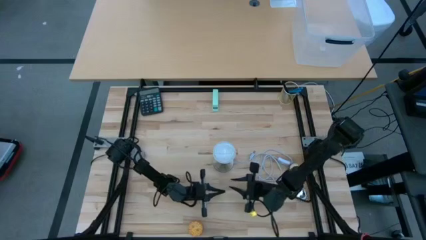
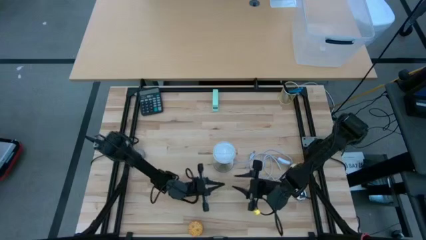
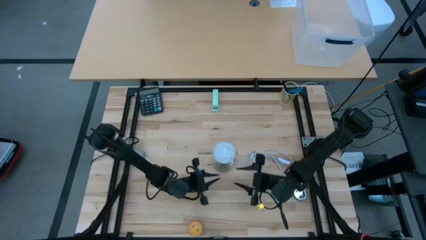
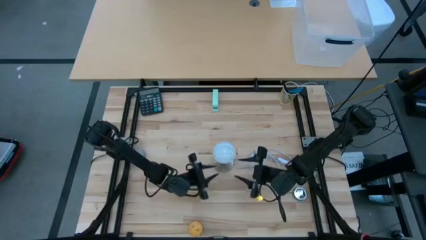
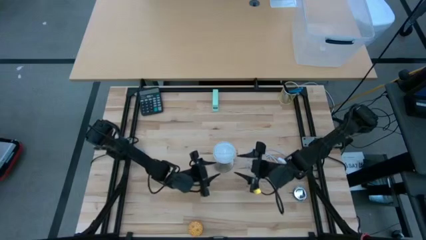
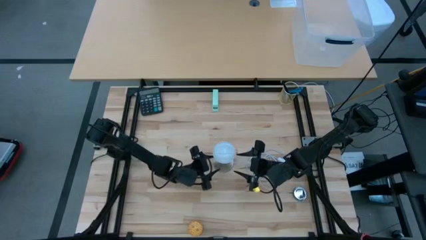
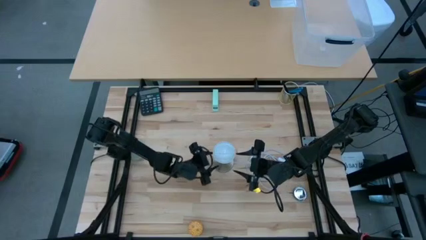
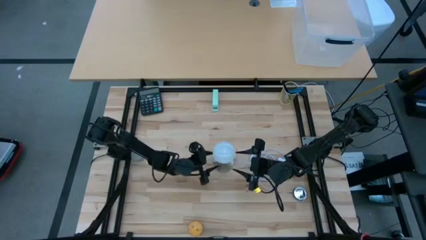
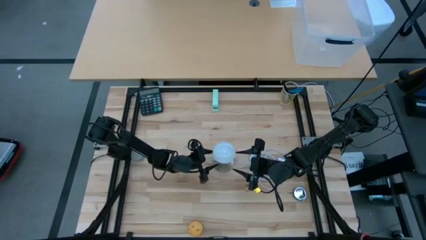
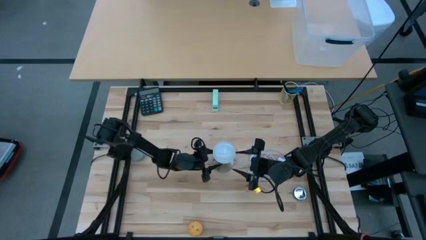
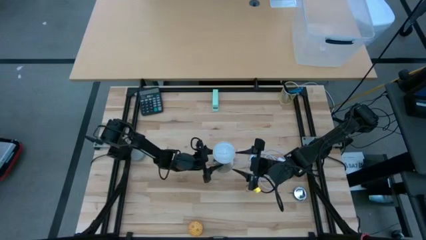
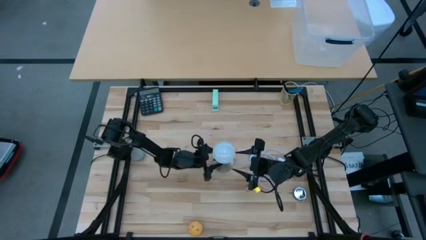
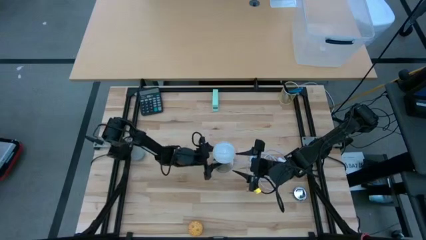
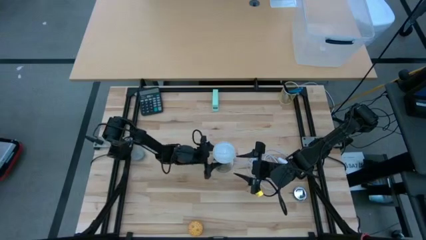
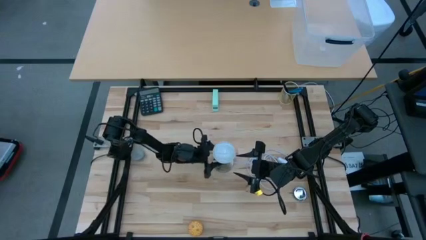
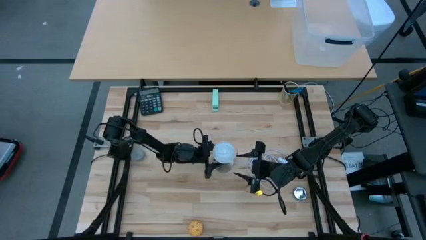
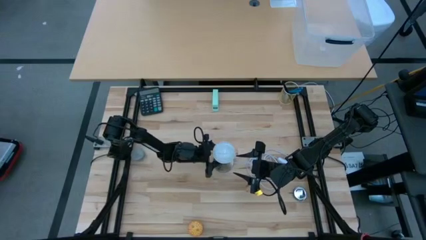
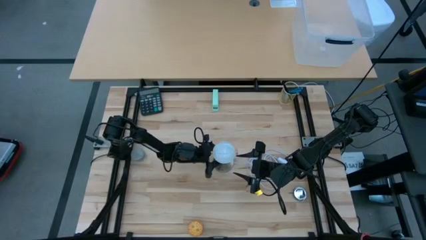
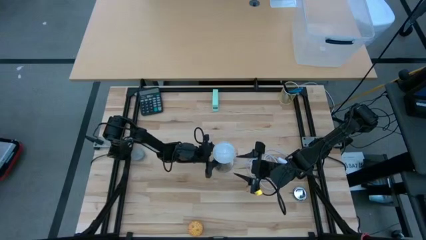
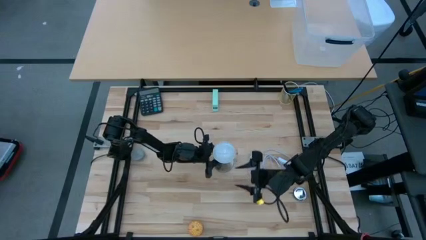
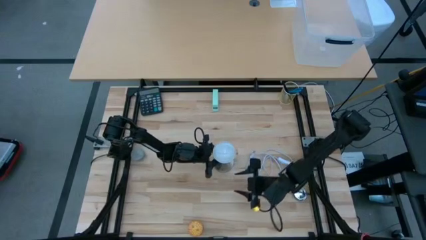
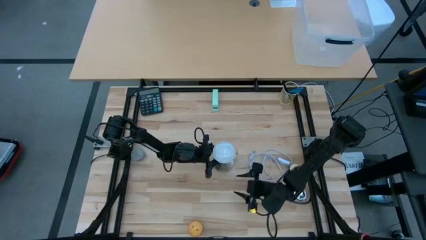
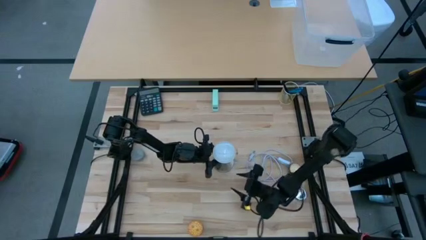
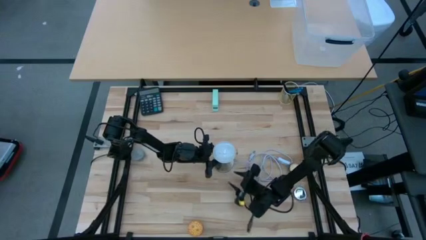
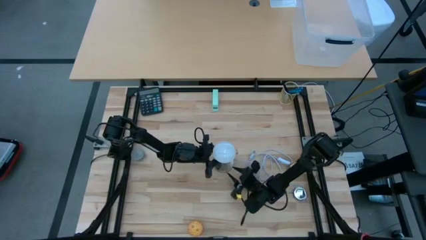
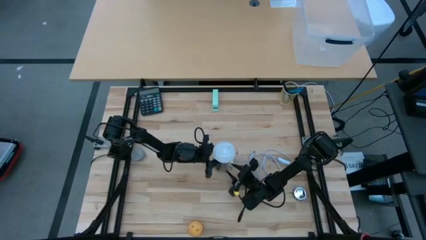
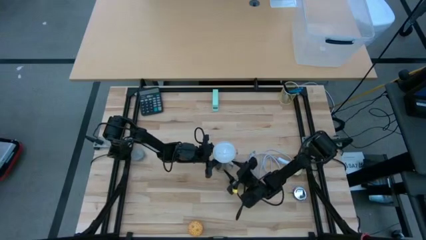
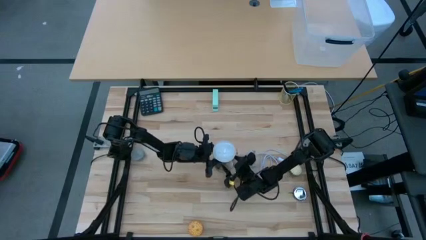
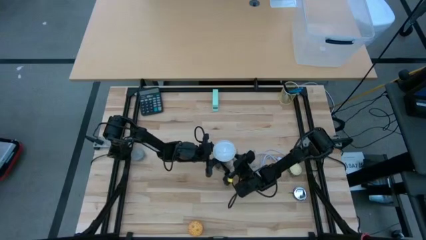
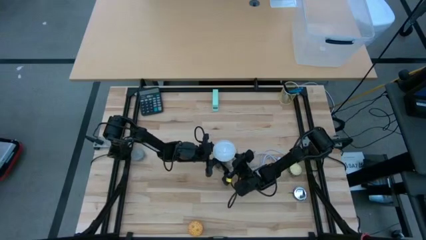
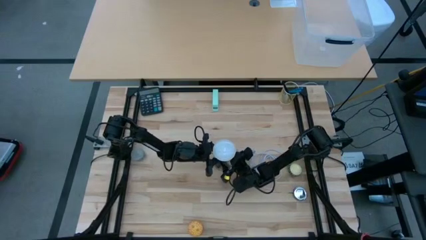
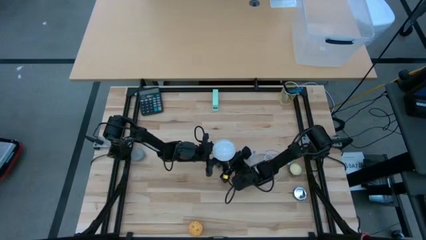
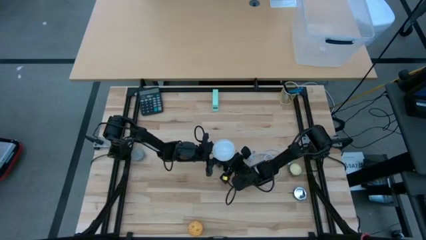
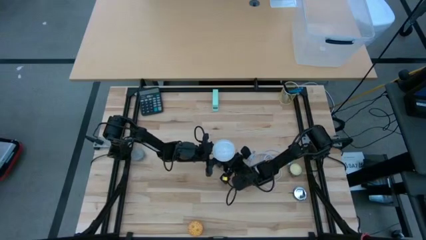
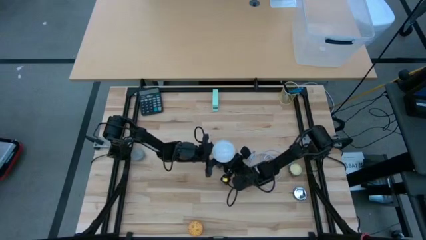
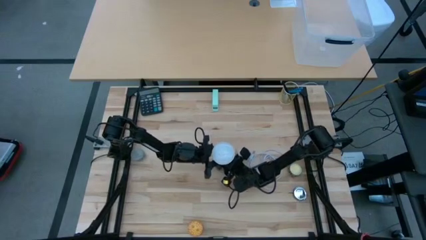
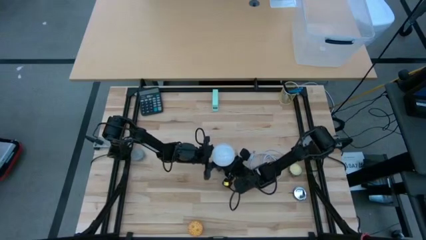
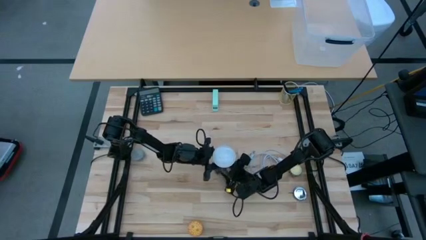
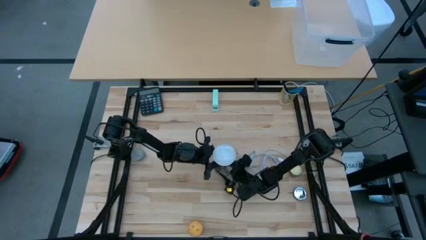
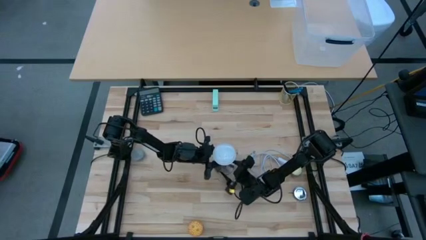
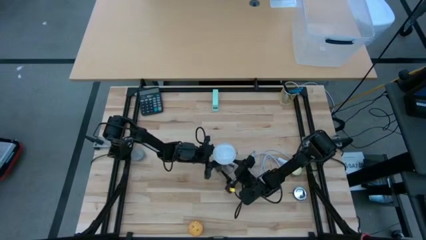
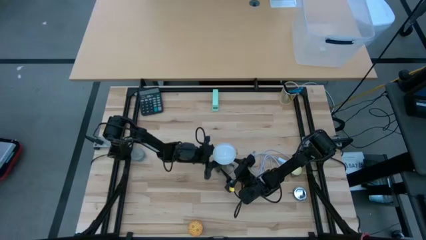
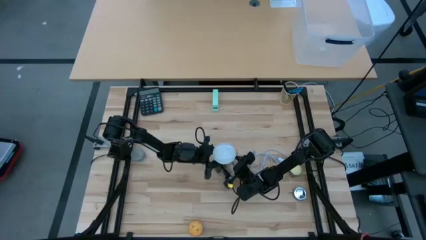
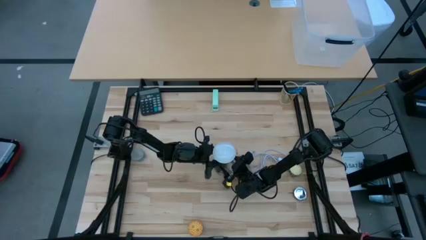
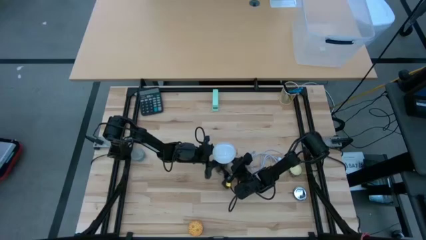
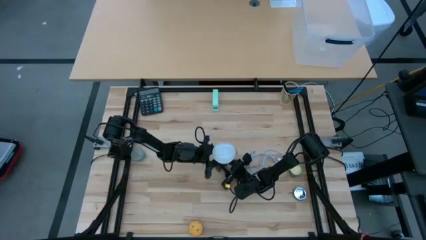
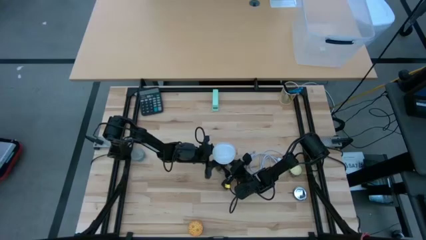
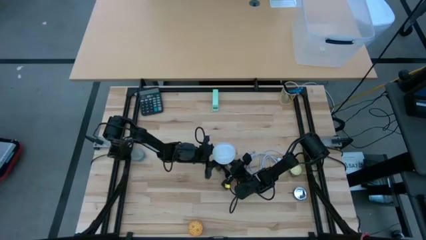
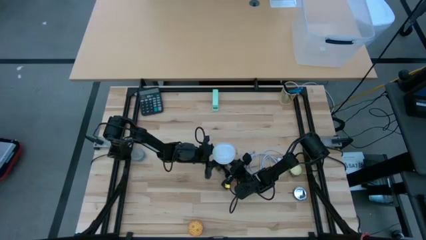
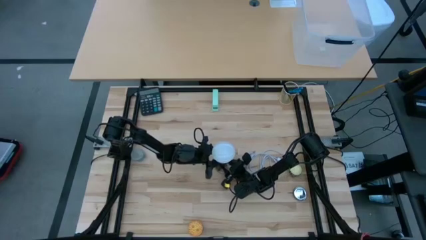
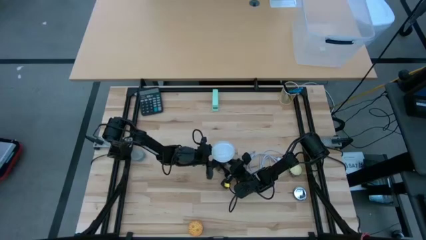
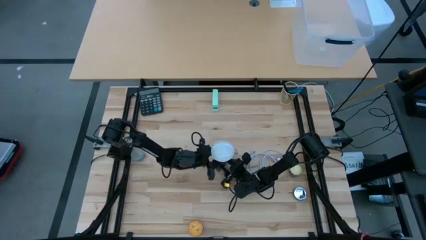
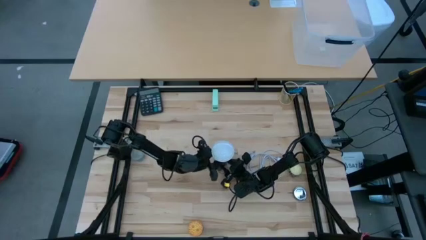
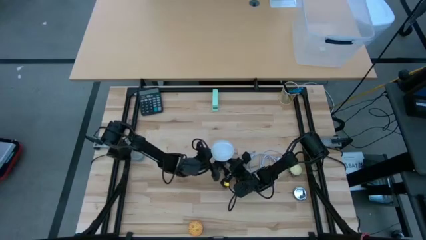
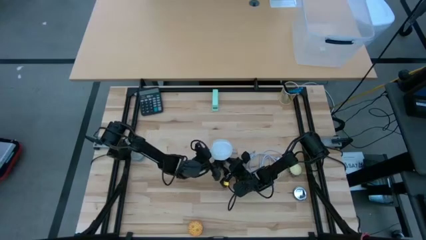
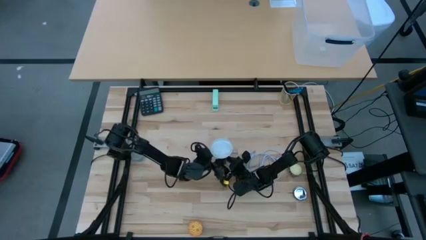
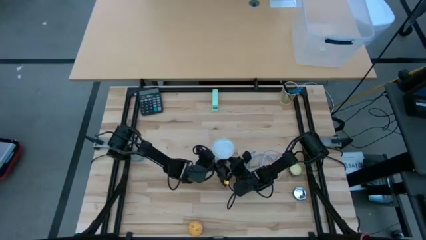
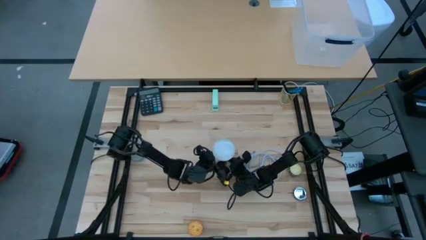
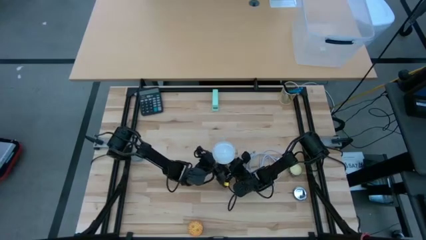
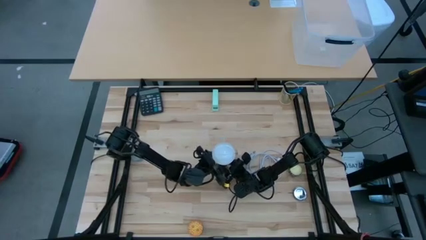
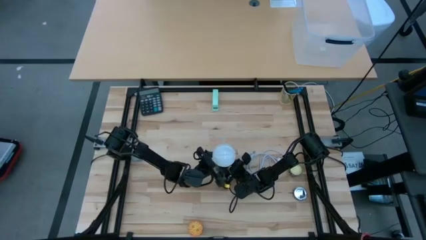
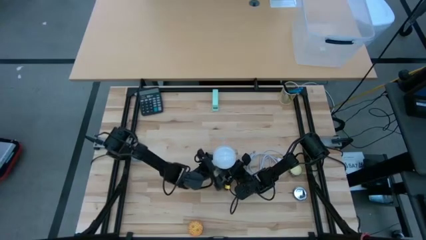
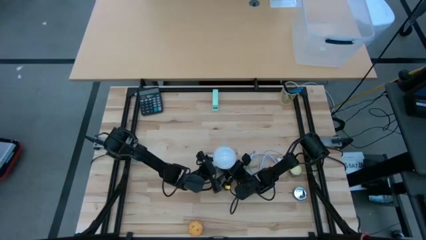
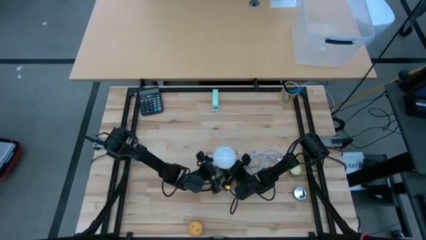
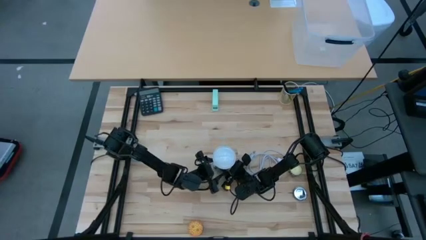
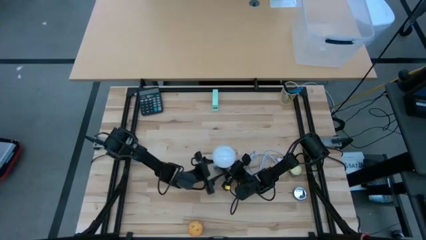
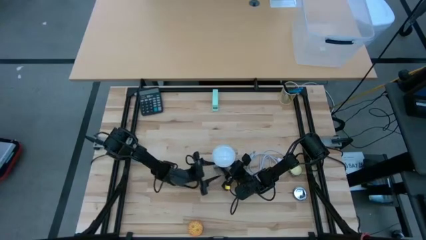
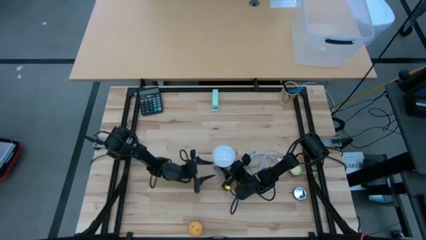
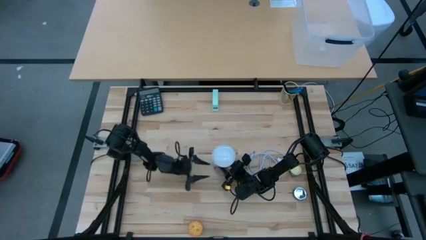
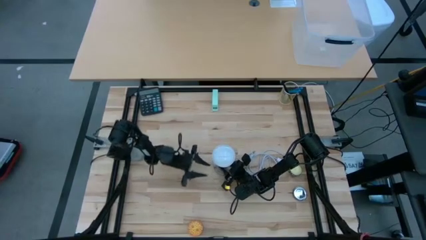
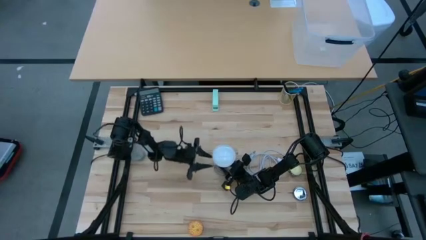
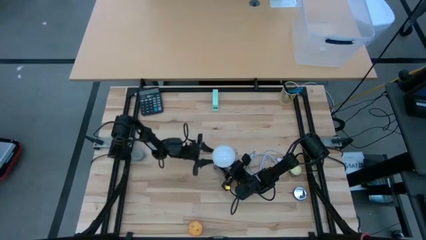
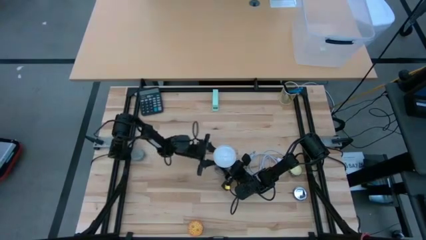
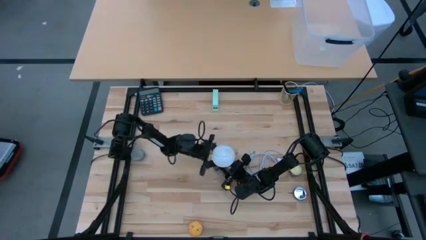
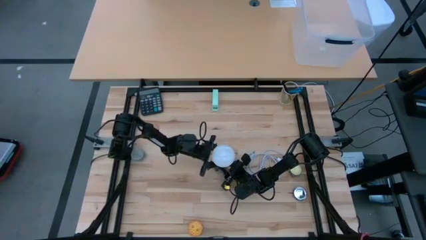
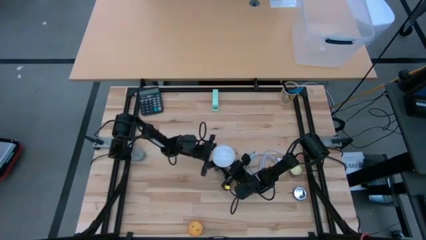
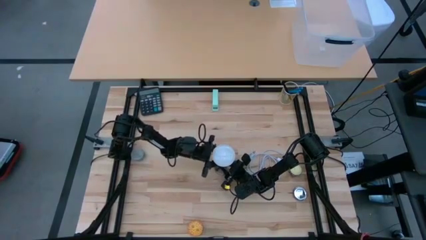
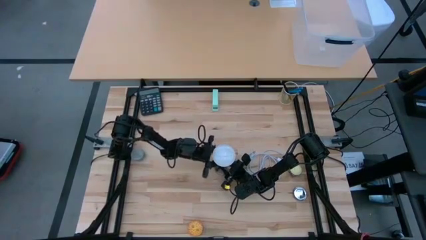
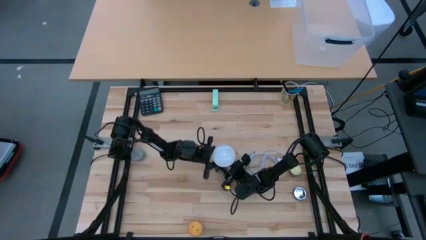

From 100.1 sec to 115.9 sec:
Task: Screw lightbulb
Remove the white lightbulb from the silver lamp
